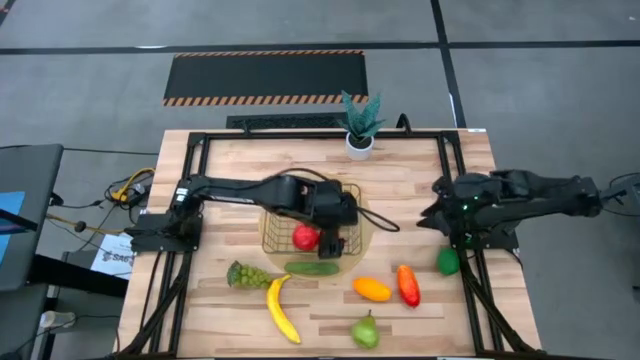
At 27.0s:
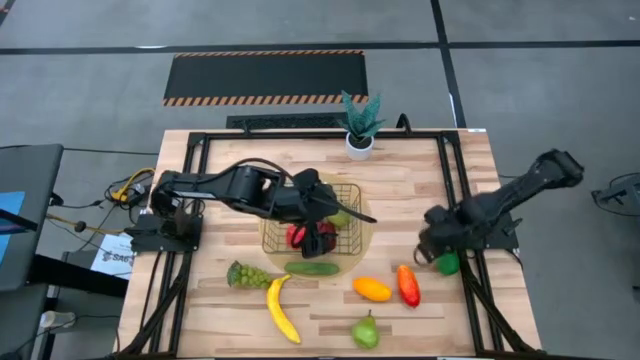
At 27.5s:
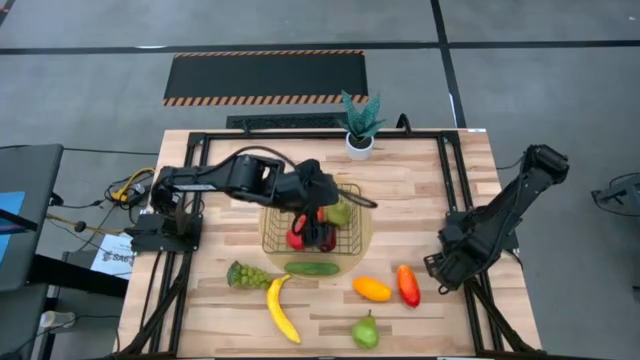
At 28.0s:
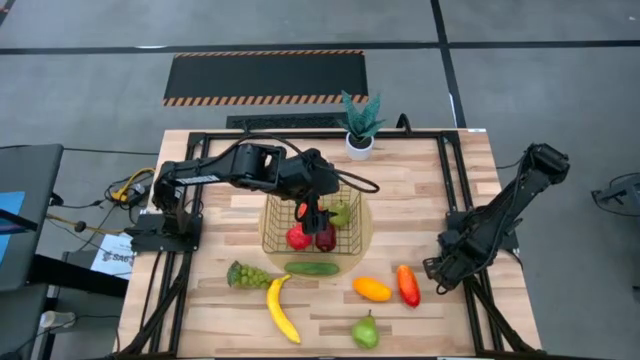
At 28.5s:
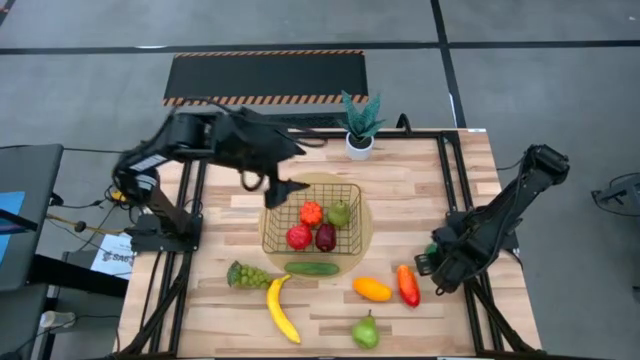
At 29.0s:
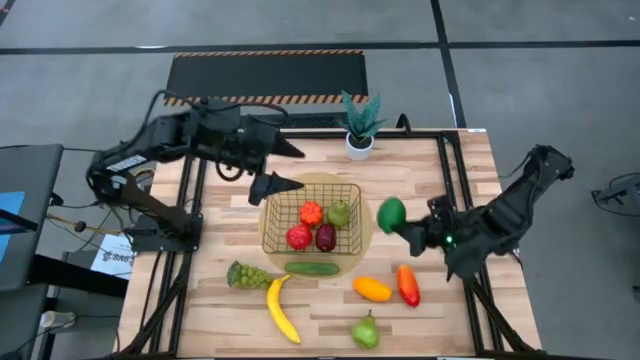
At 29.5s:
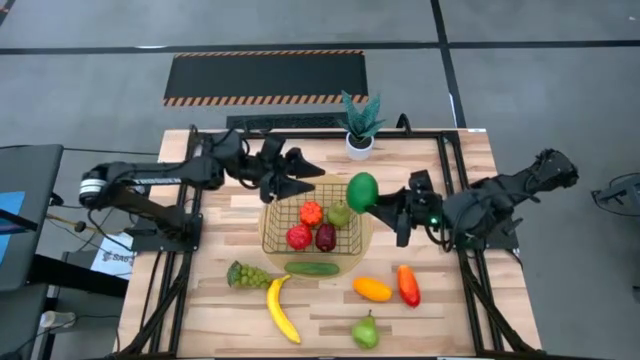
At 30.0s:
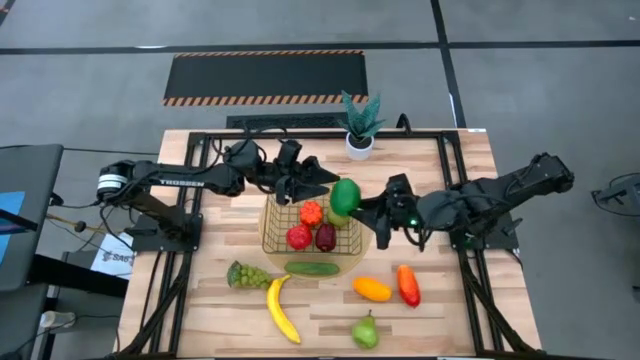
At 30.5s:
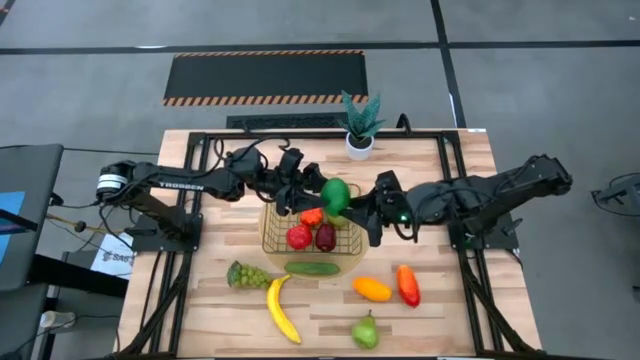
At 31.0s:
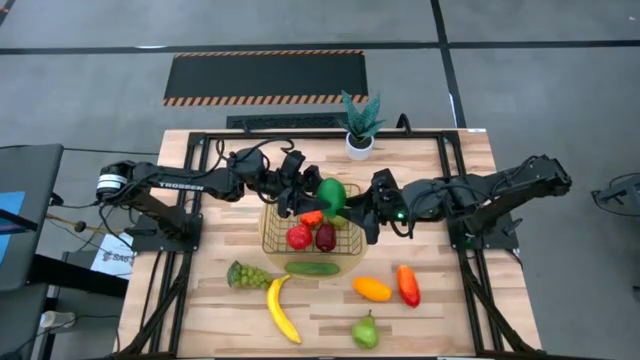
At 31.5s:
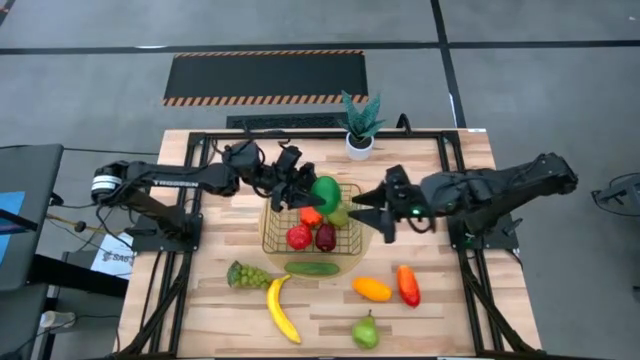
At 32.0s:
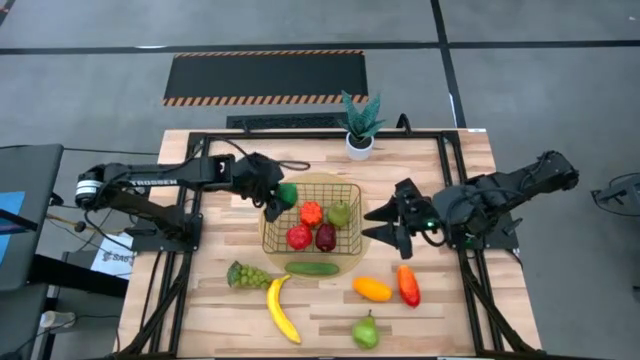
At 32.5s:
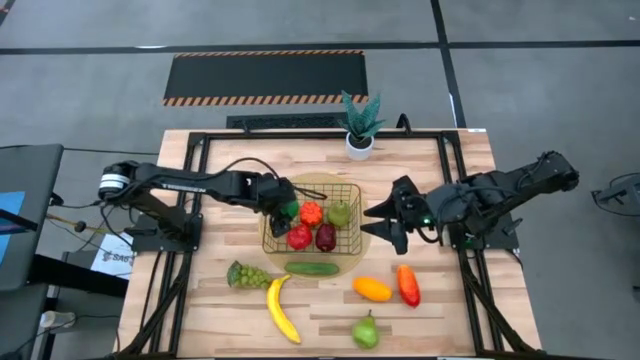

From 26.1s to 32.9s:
Task: Build produce basket
Put the avocado into the silver basket

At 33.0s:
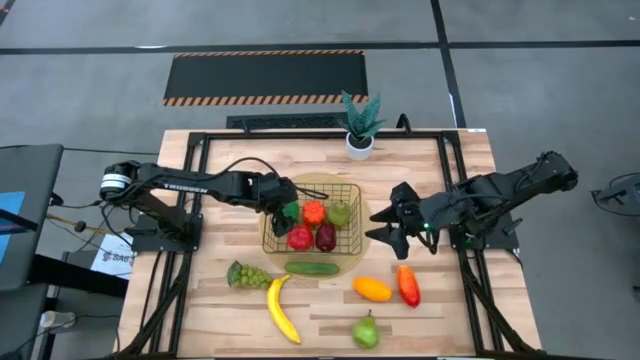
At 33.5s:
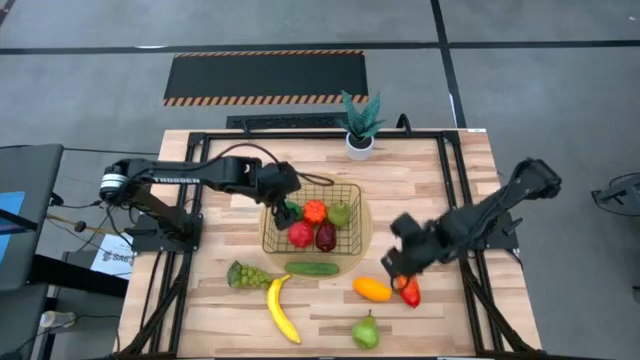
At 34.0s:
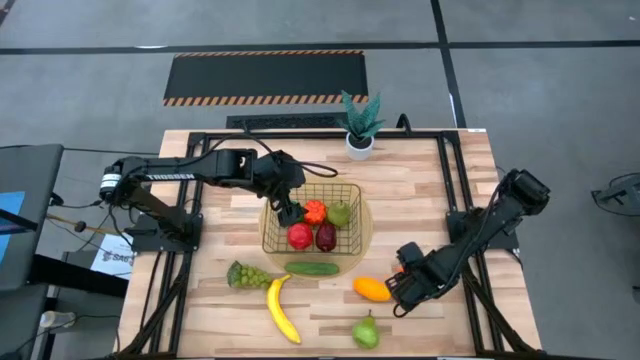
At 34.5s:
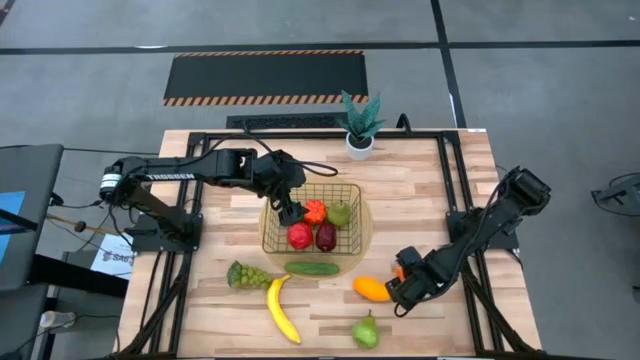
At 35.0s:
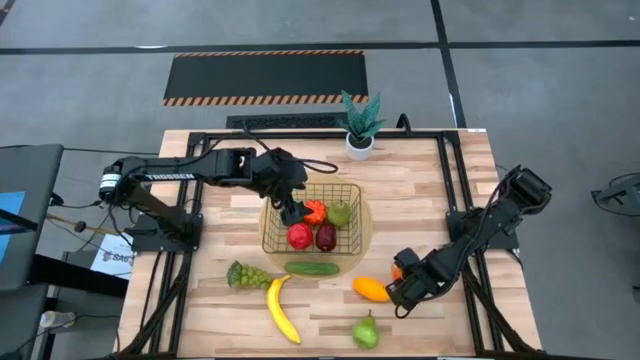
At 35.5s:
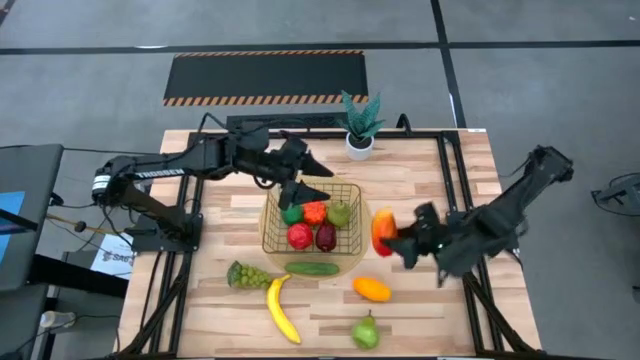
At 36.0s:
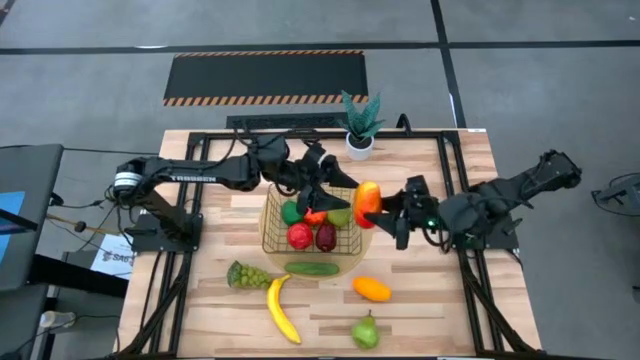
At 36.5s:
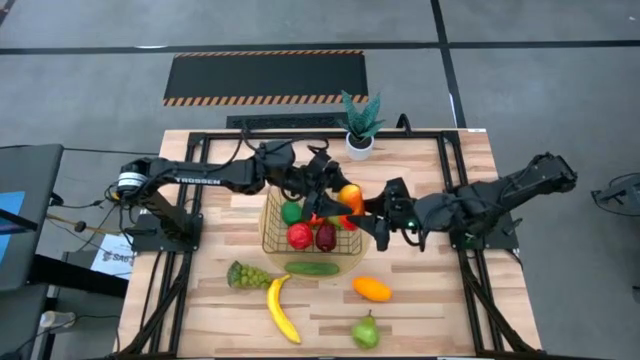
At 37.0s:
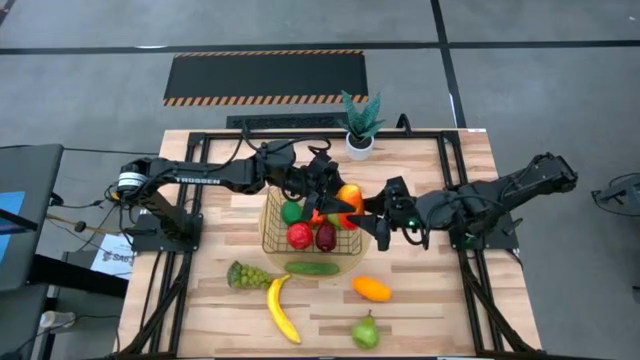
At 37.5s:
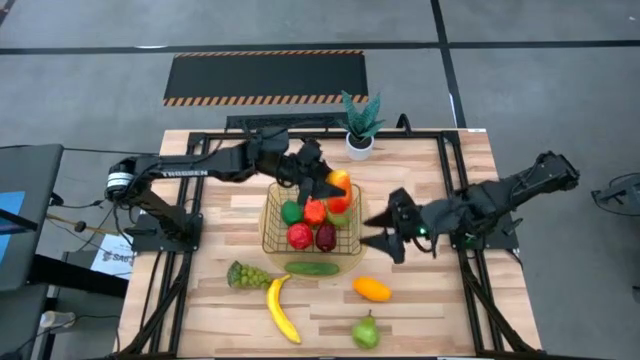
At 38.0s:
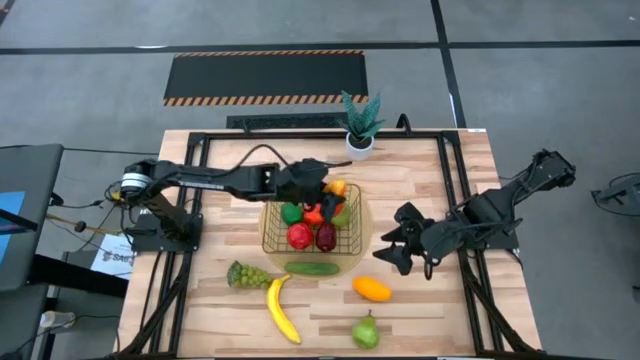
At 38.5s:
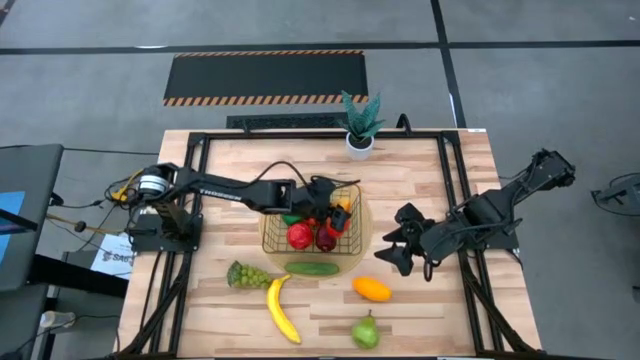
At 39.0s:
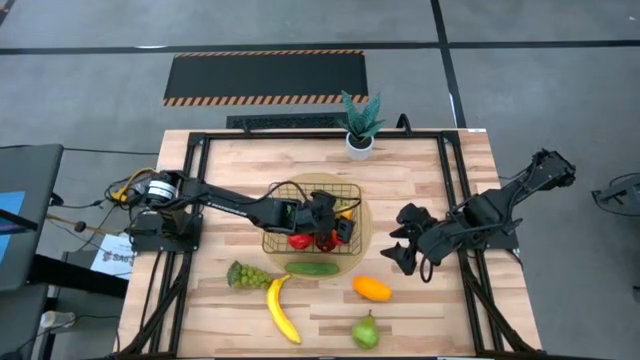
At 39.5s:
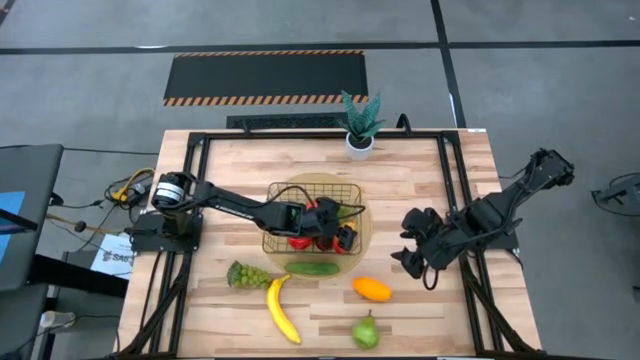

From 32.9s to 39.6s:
Put the red mango into the silver basket

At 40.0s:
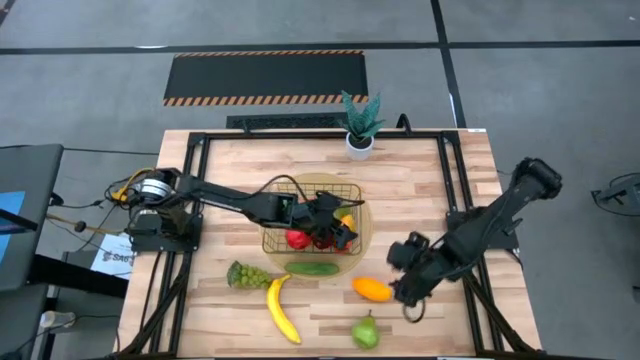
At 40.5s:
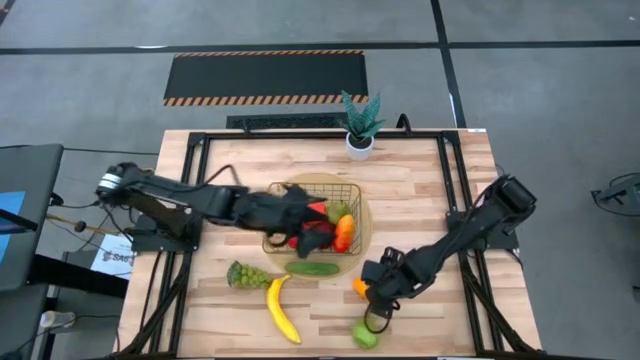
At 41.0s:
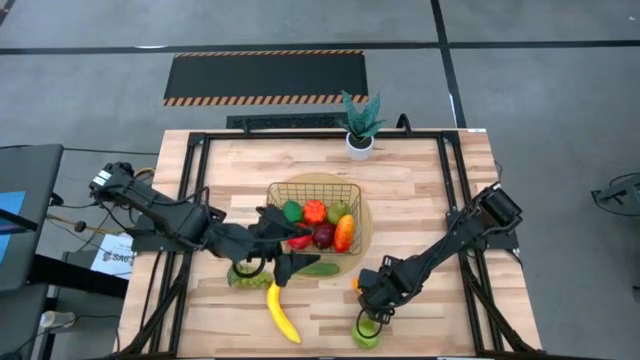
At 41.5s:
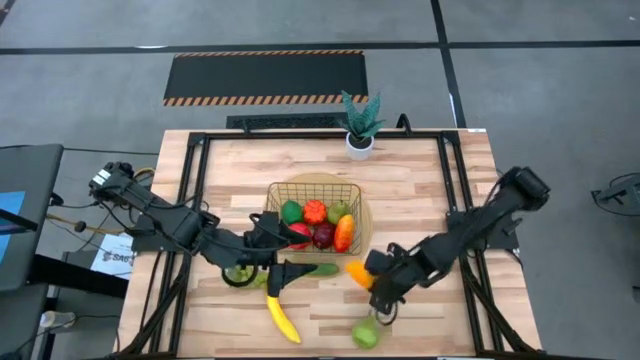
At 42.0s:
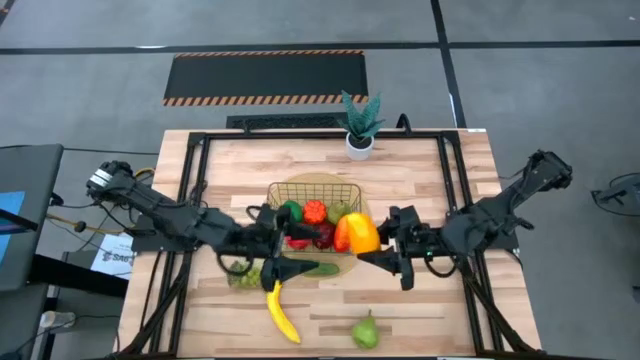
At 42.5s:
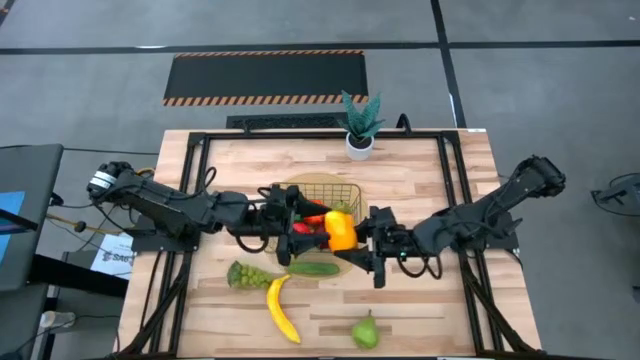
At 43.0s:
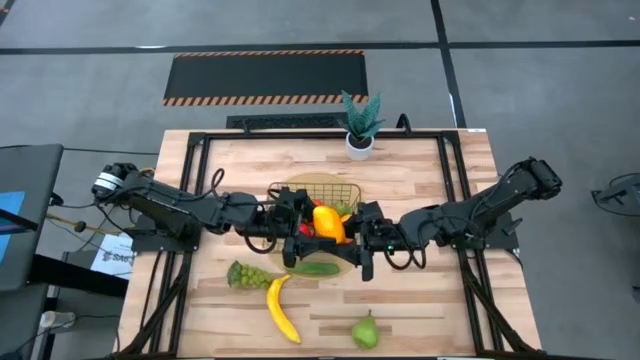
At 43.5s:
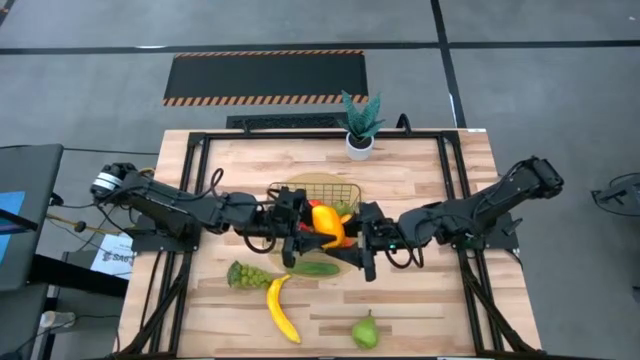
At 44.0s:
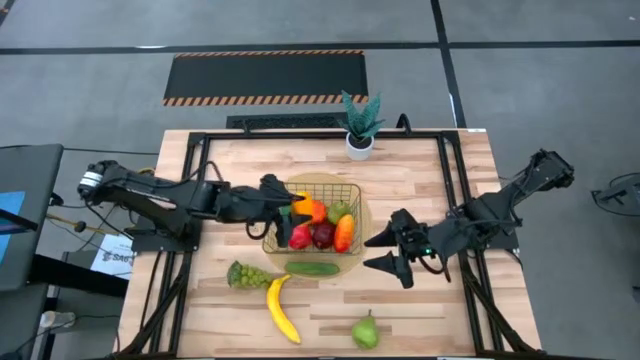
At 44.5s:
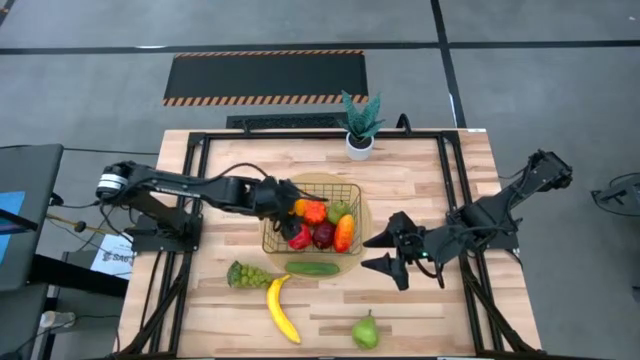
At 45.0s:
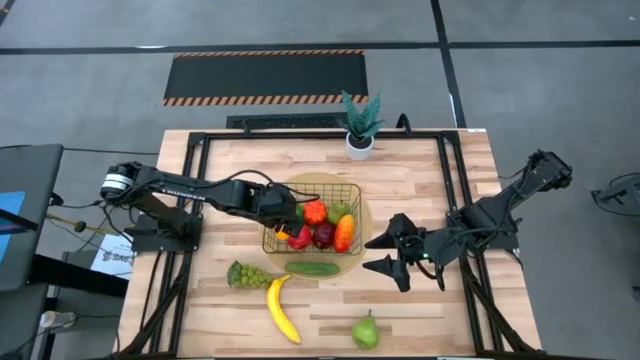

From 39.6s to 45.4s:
Put the yellow mango into the silver basket

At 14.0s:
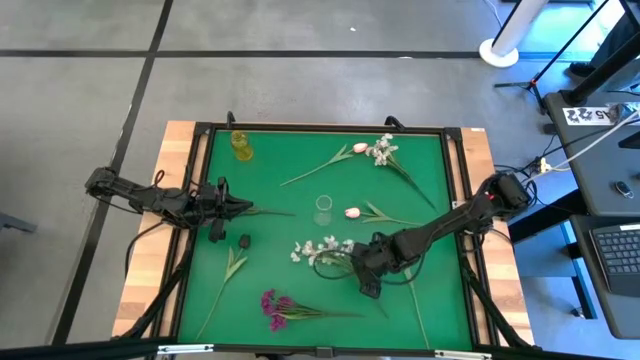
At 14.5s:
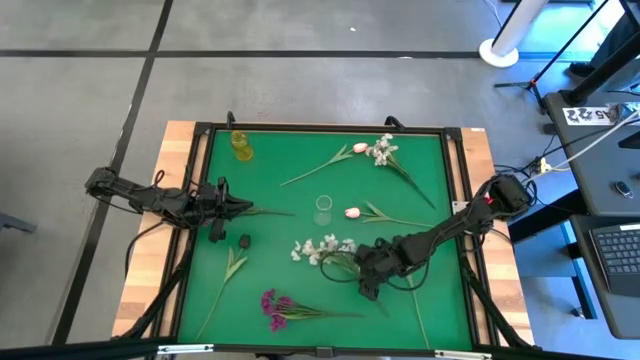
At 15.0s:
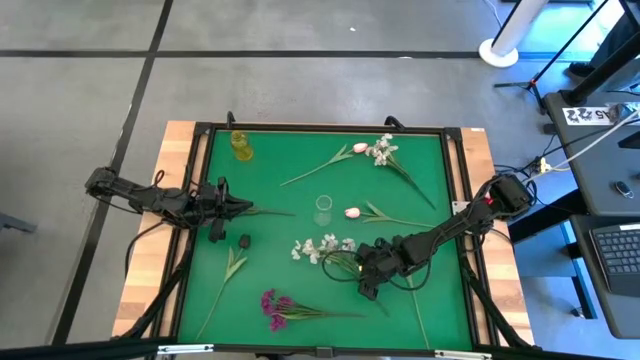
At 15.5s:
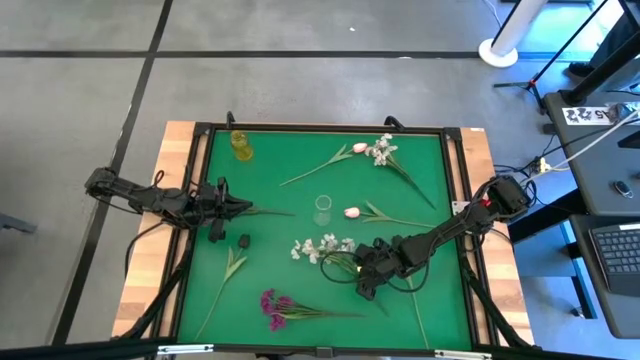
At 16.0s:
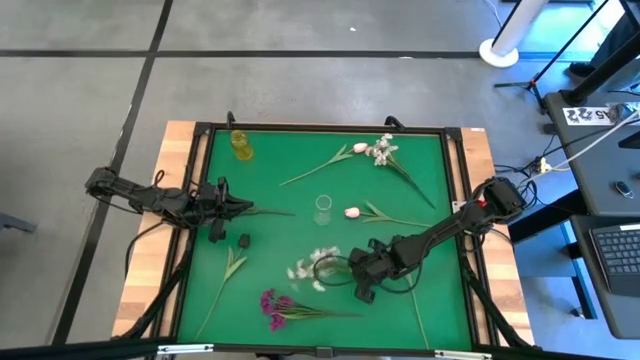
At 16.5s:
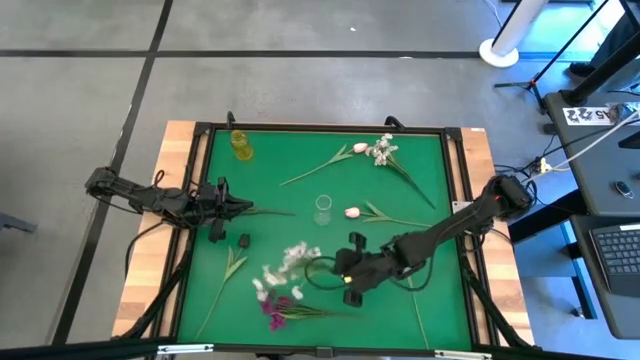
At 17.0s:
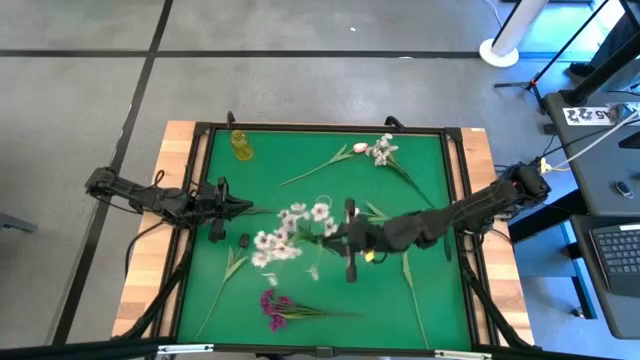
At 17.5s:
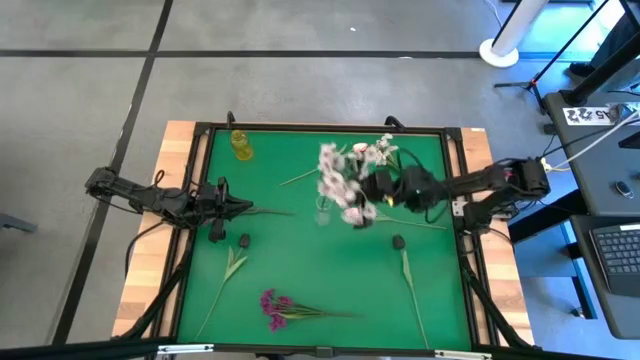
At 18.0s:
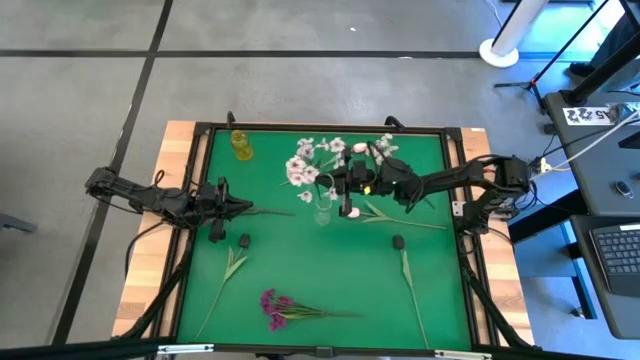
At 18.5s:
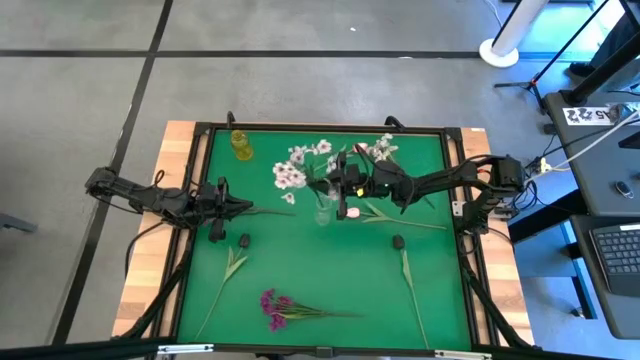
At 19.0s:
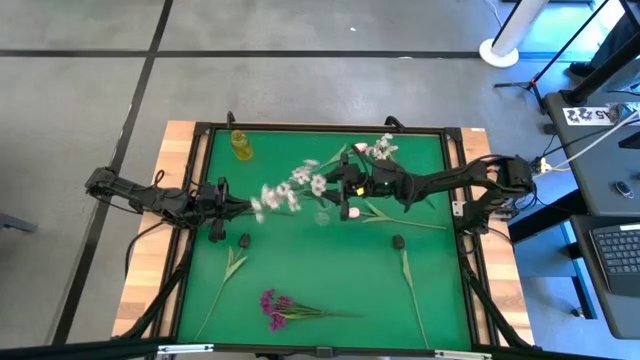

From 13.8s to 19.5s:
Task: Sort flowers into vase by color
Put the bottom white flowers into the transparent vase
